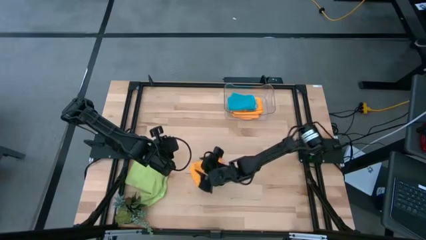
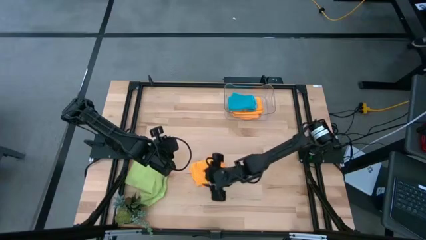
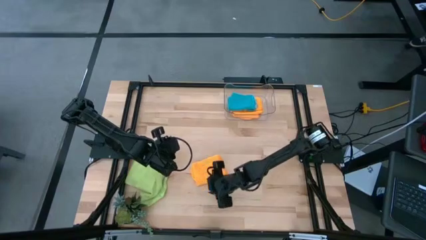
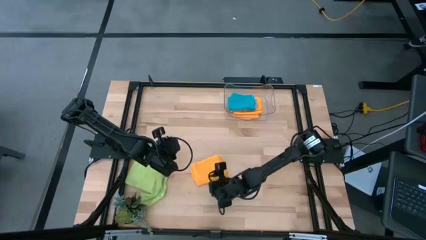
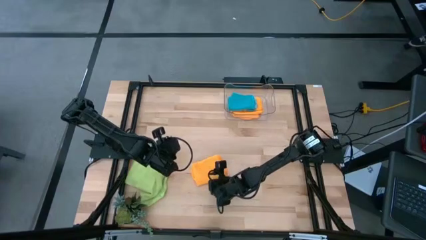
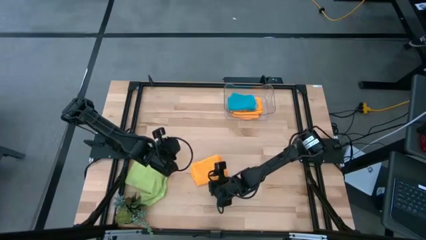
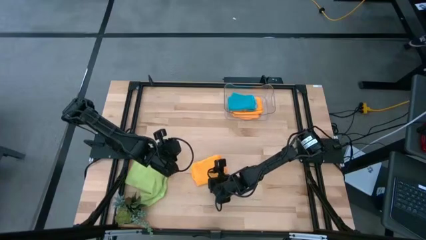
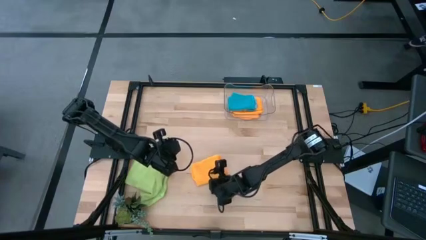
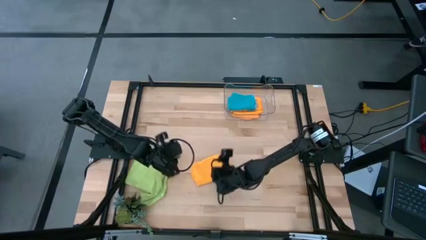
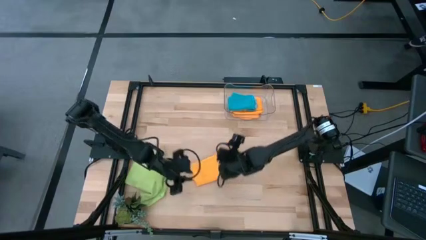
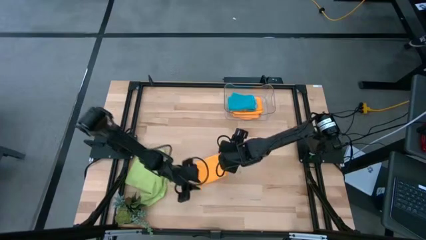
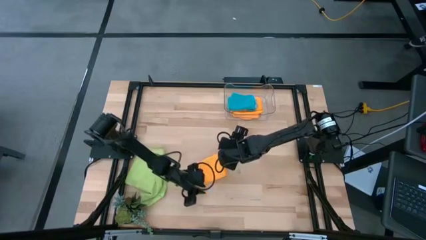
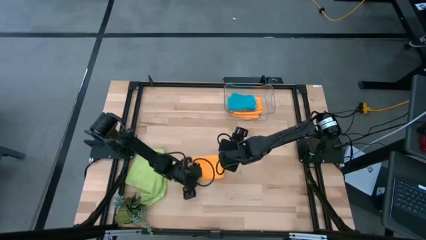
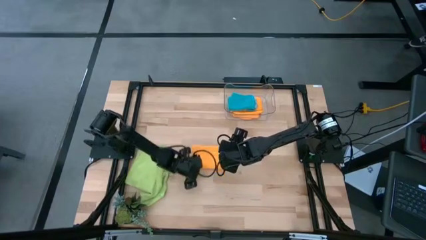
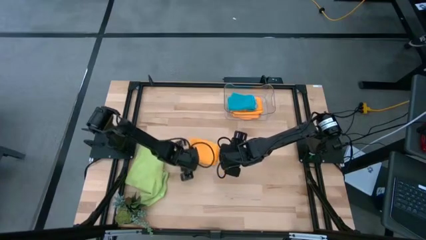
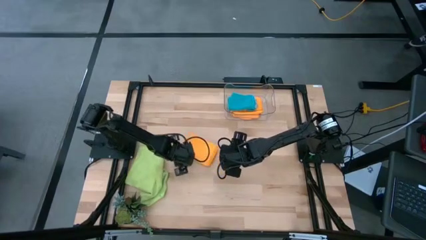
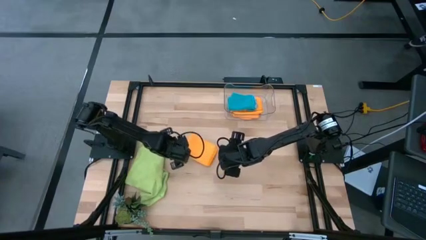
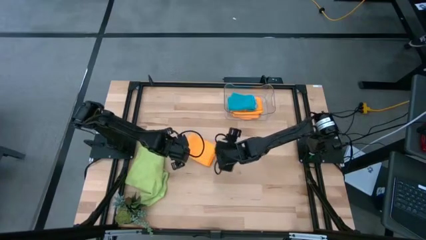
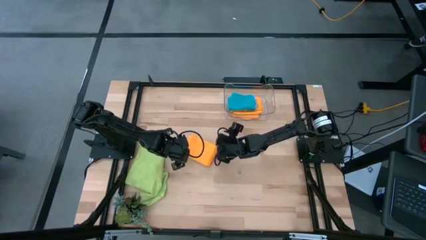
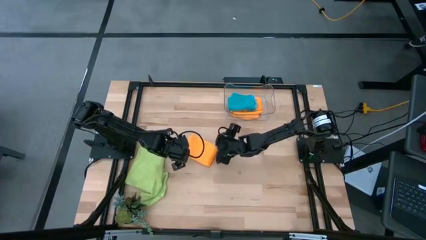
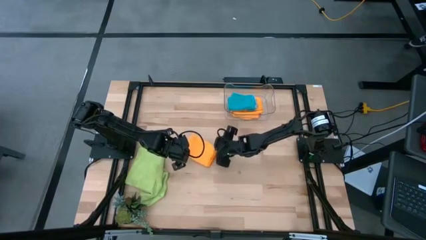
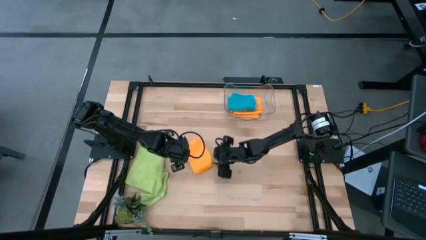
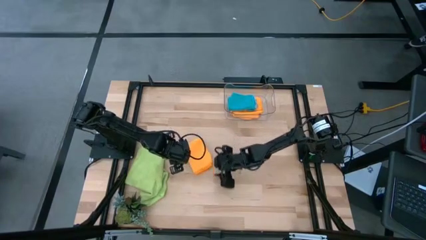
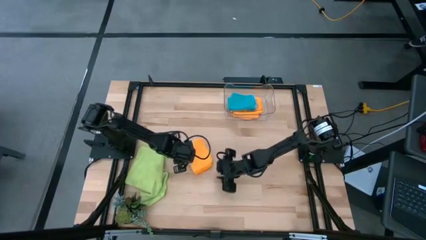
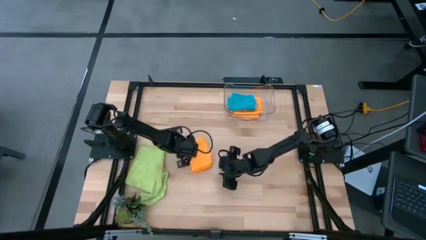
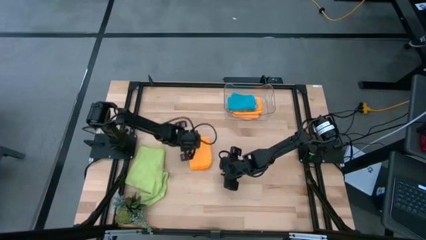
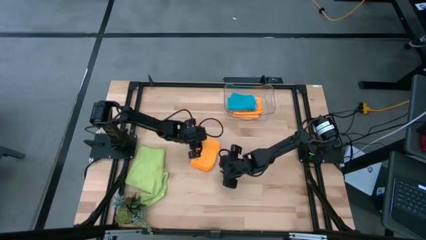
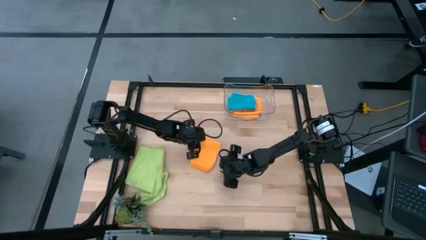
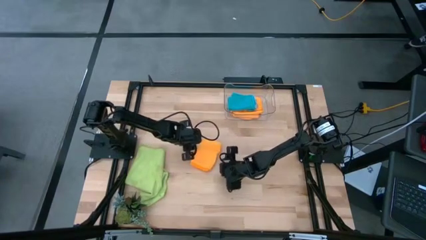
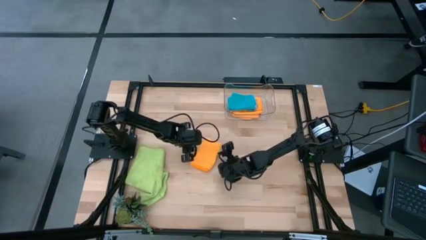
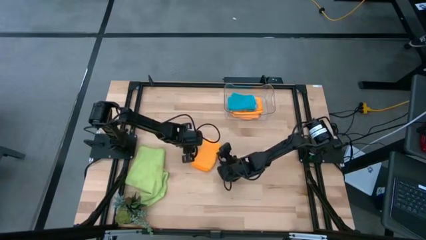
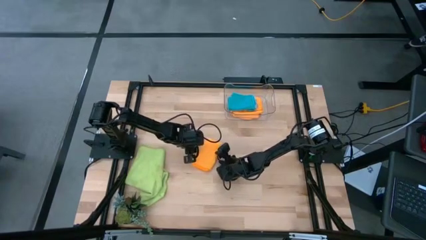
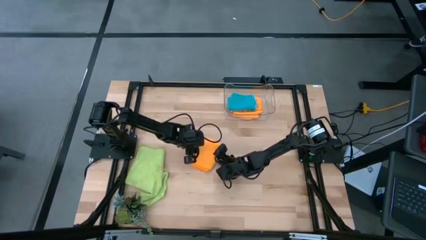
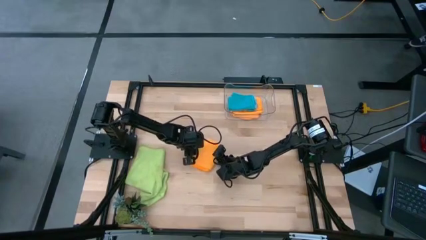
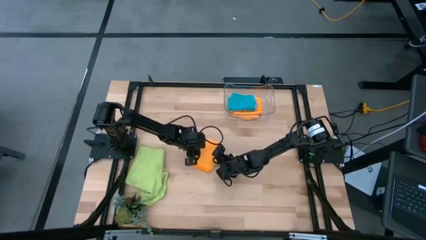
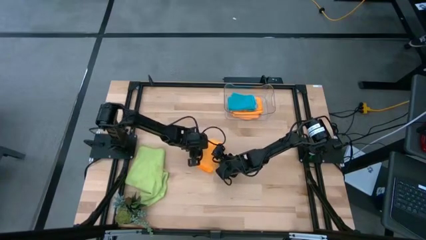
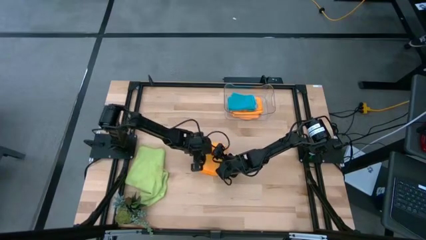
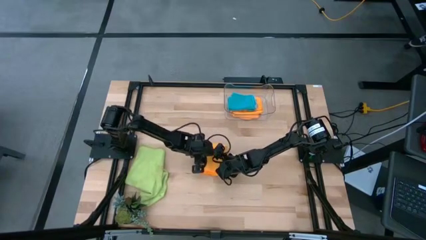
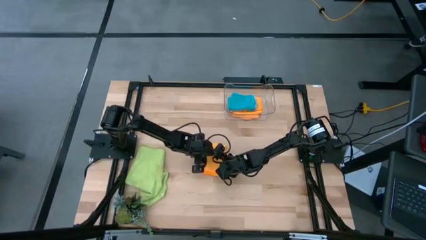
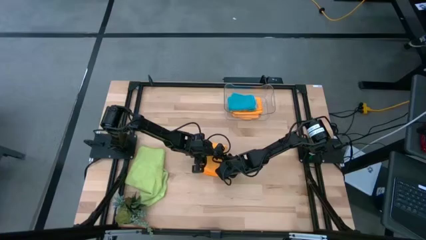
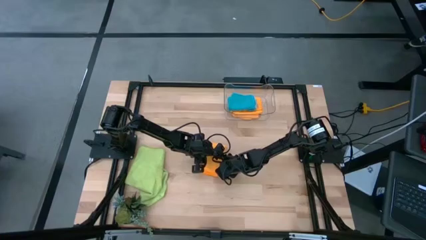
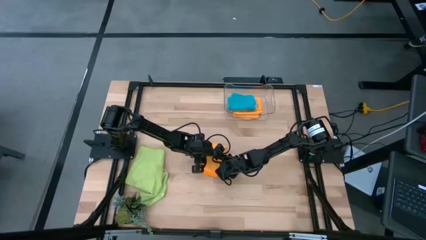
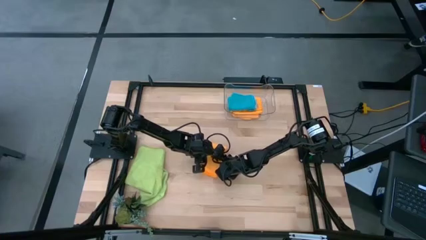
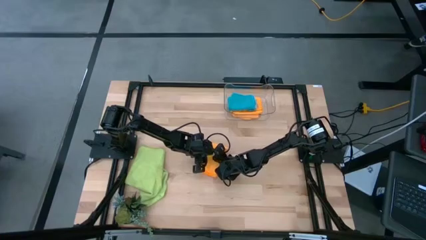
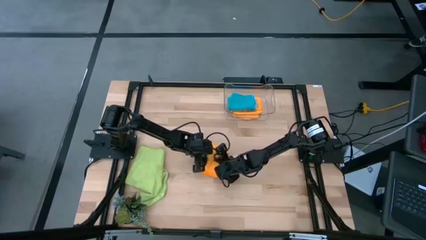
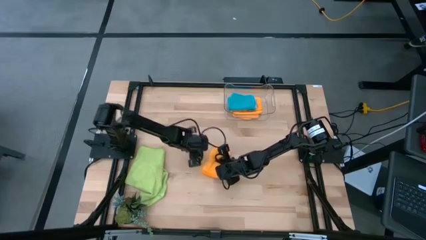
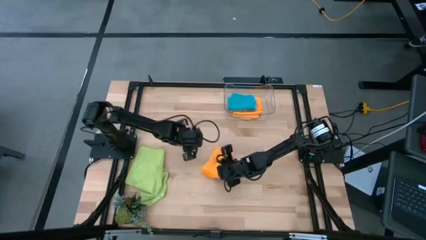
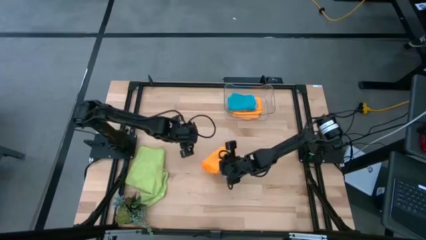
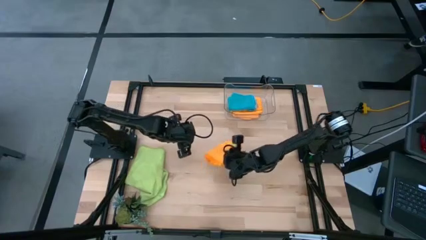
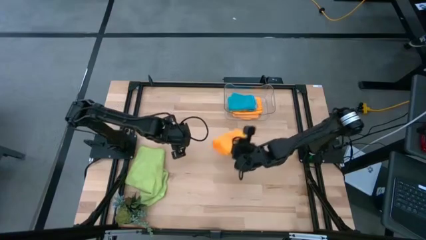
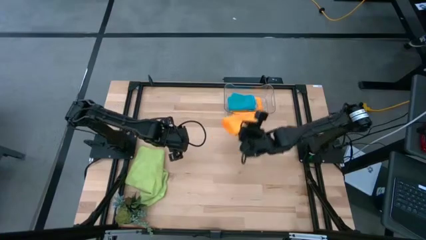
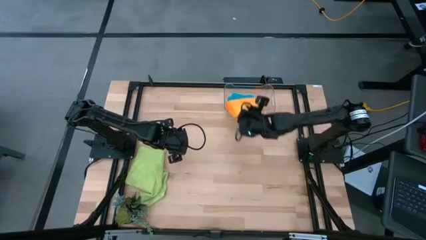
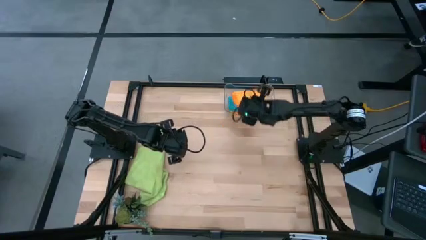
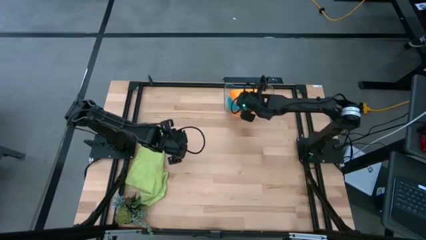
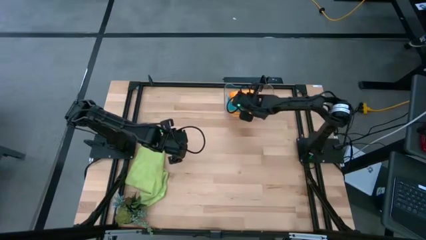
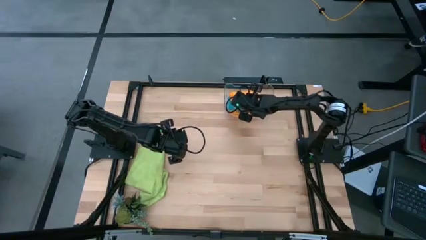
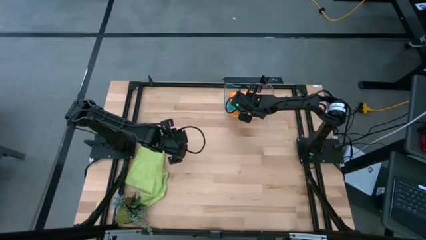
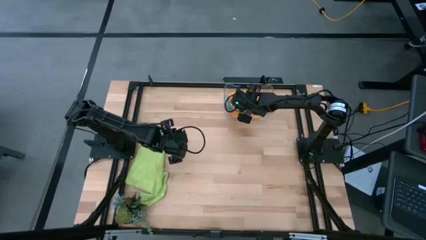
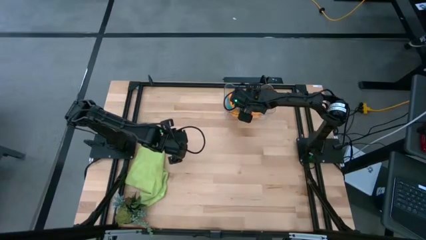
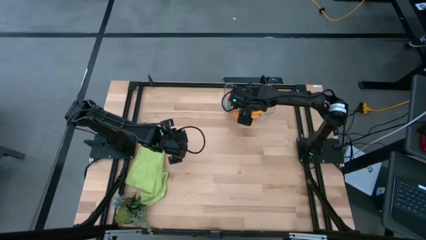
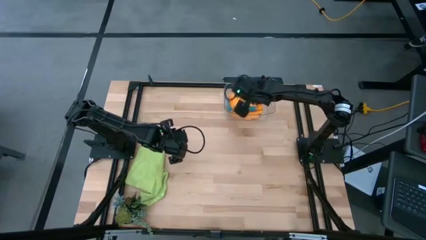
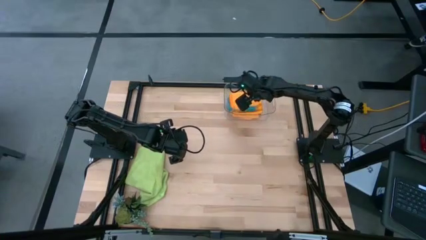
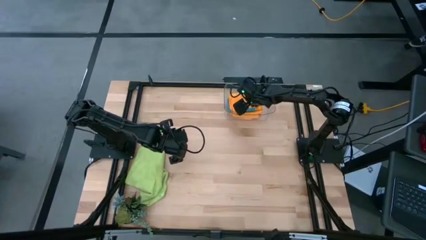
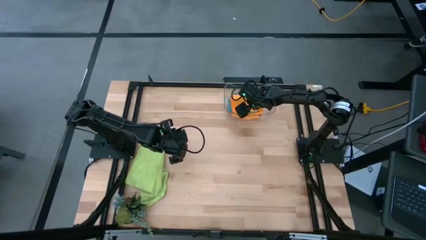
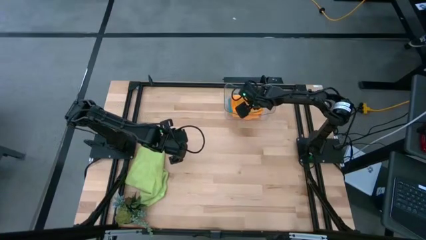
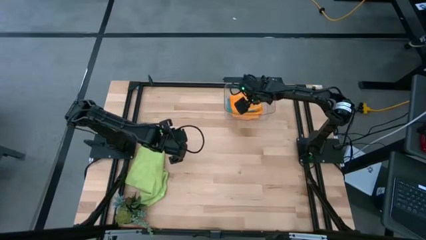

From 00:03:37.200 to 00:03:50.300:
Task: Fold microfiber towels
Stack the folded orange microfiber towel on top of the blue microfiber towel in the transparent bin
